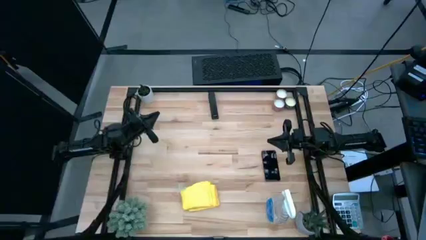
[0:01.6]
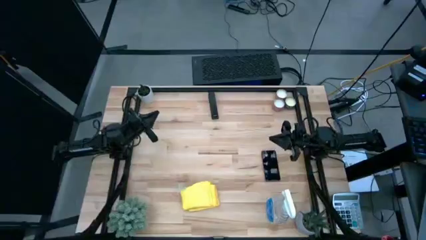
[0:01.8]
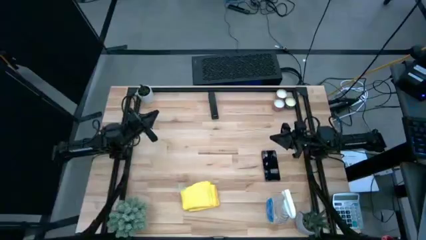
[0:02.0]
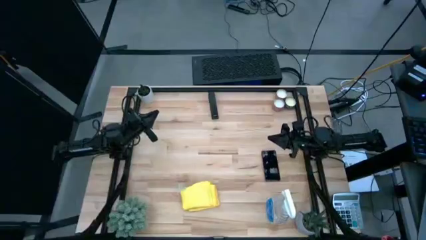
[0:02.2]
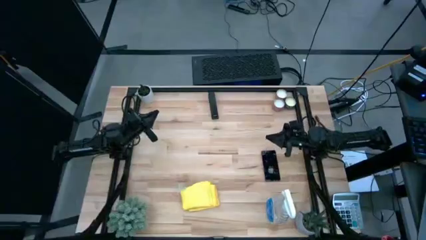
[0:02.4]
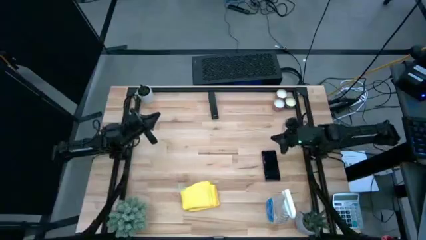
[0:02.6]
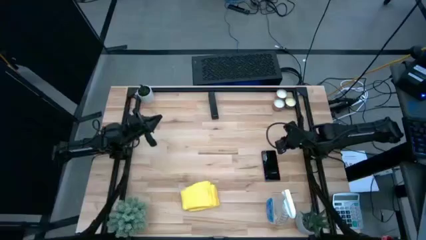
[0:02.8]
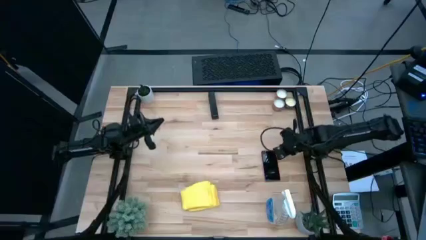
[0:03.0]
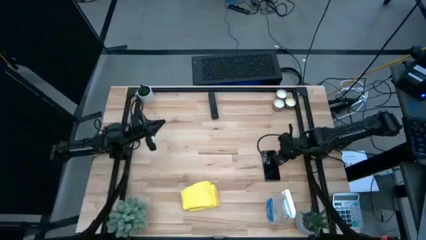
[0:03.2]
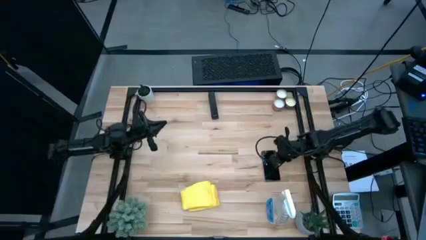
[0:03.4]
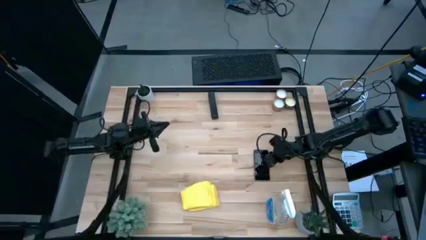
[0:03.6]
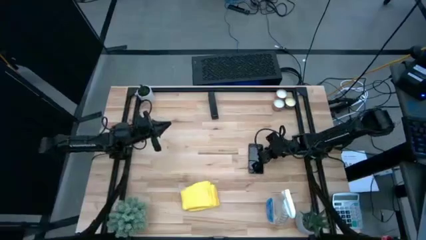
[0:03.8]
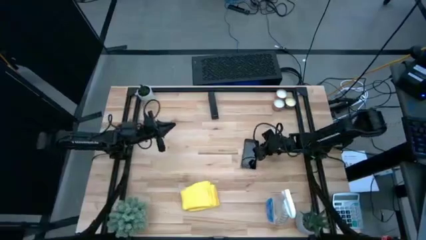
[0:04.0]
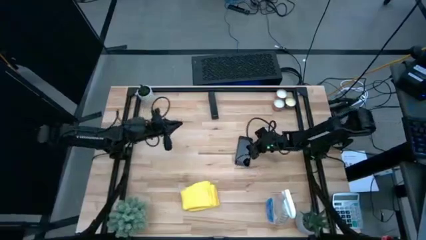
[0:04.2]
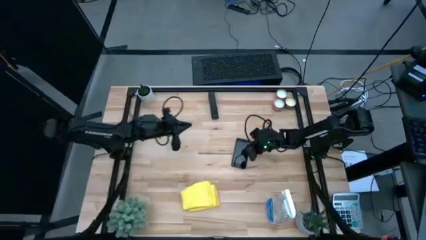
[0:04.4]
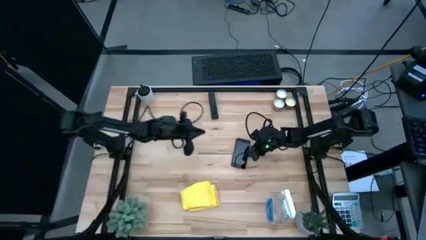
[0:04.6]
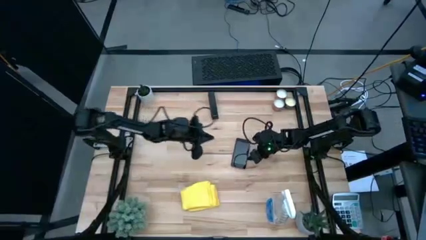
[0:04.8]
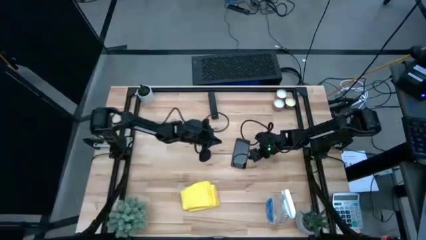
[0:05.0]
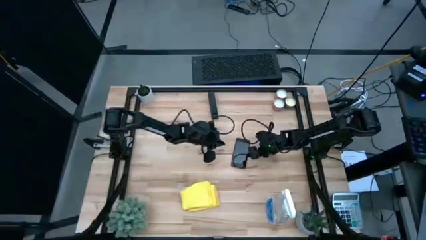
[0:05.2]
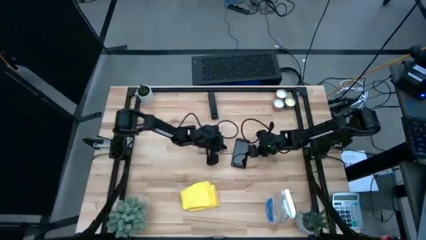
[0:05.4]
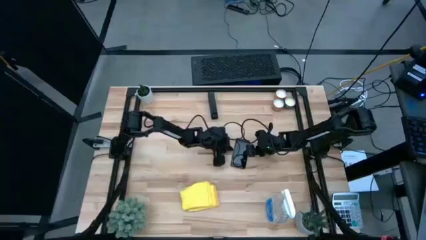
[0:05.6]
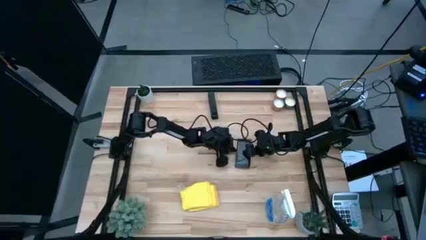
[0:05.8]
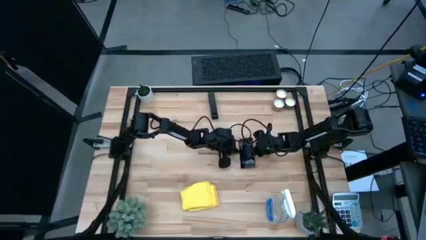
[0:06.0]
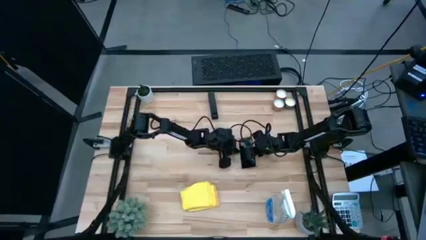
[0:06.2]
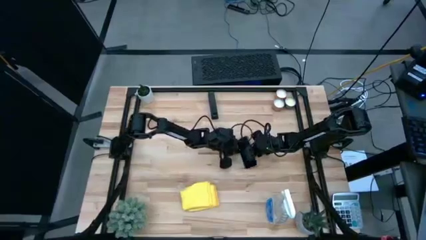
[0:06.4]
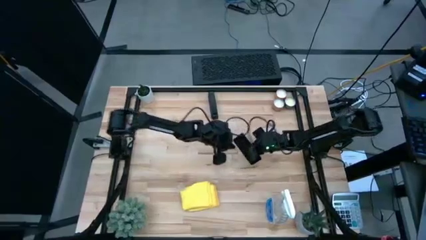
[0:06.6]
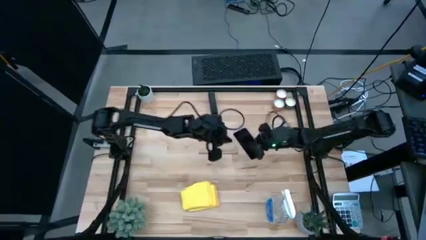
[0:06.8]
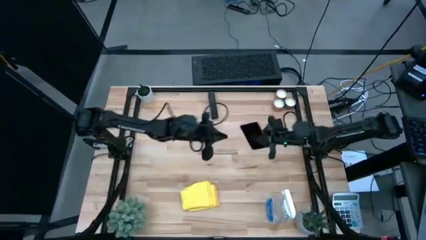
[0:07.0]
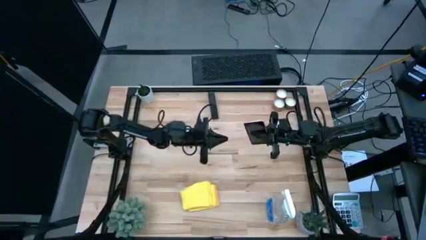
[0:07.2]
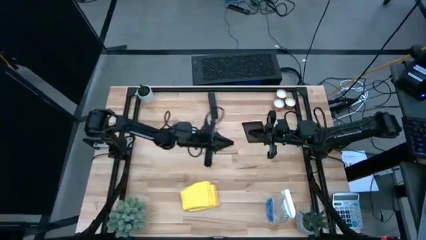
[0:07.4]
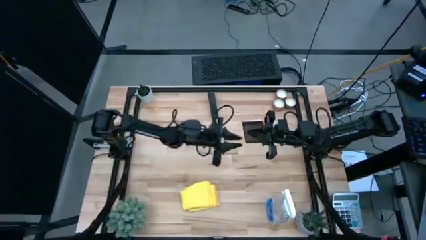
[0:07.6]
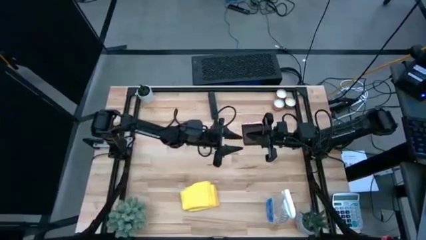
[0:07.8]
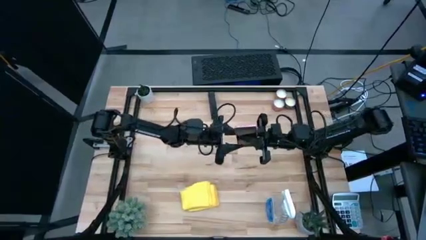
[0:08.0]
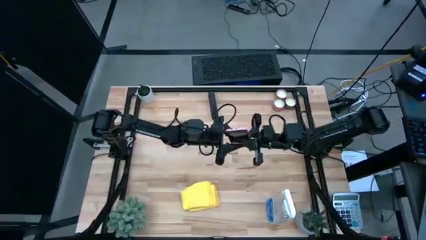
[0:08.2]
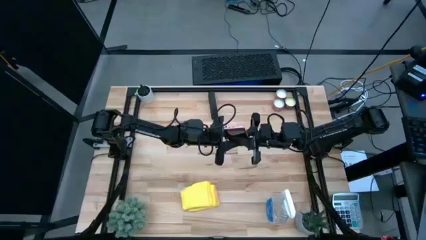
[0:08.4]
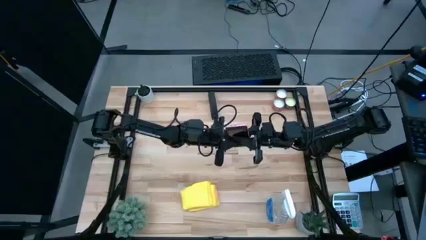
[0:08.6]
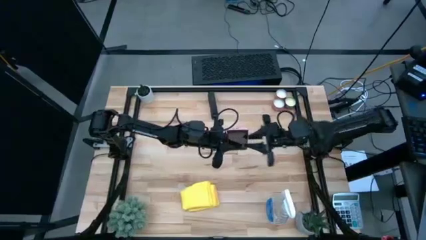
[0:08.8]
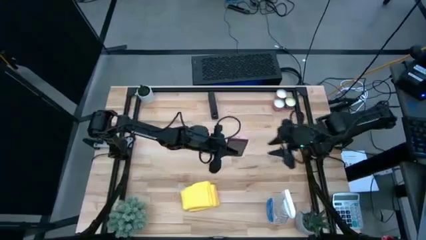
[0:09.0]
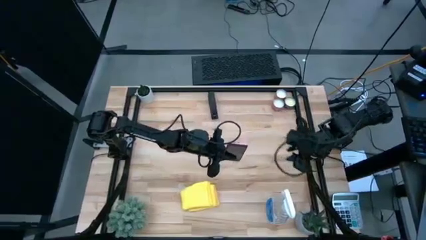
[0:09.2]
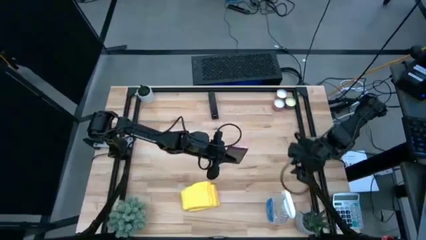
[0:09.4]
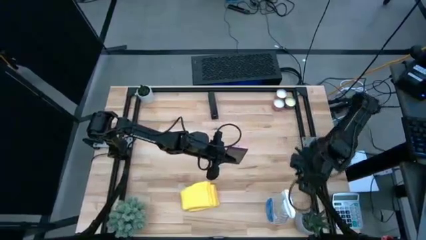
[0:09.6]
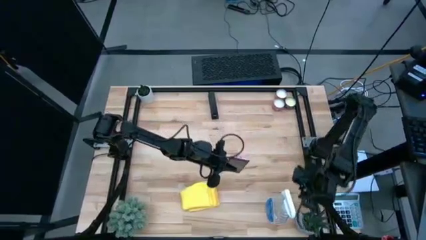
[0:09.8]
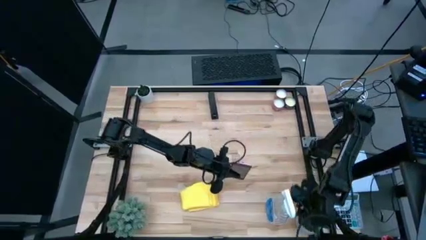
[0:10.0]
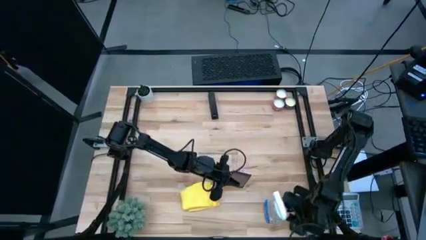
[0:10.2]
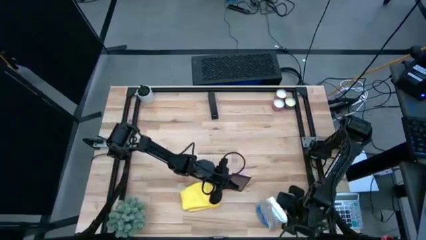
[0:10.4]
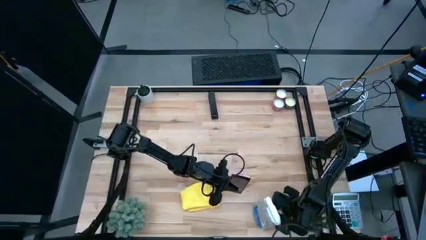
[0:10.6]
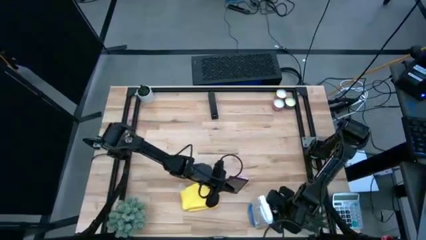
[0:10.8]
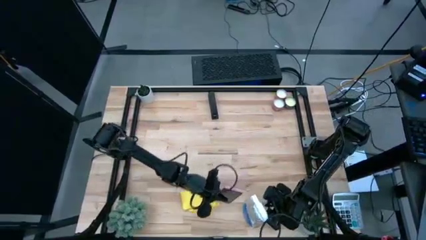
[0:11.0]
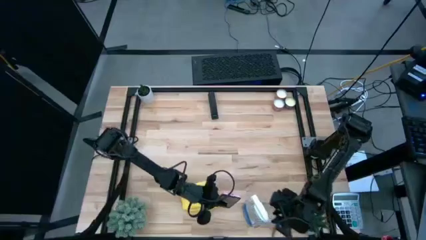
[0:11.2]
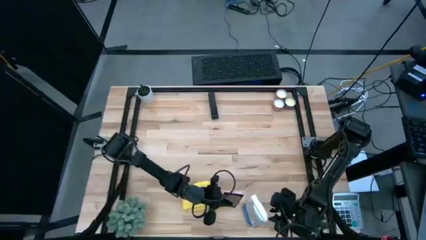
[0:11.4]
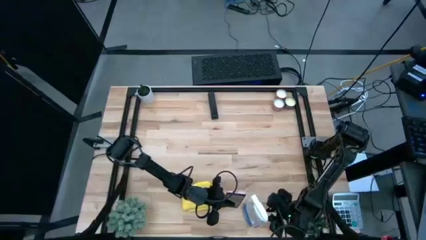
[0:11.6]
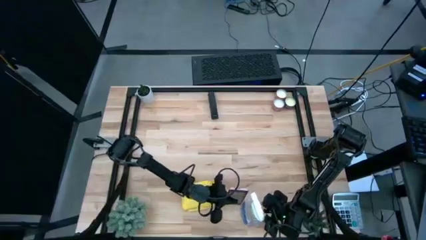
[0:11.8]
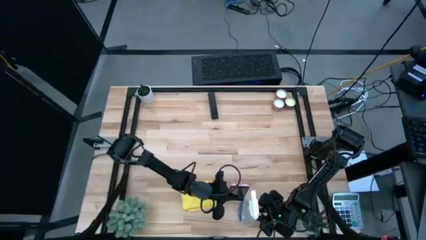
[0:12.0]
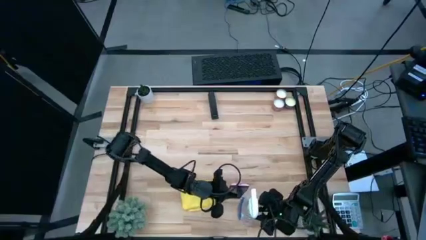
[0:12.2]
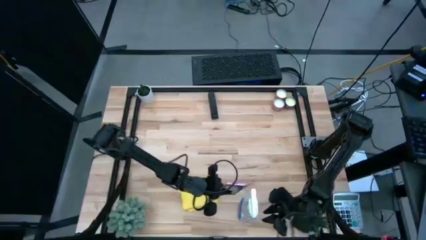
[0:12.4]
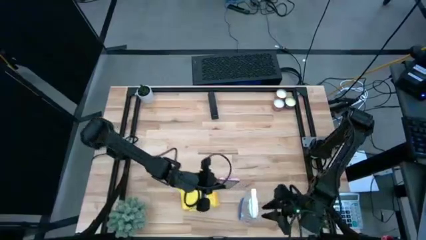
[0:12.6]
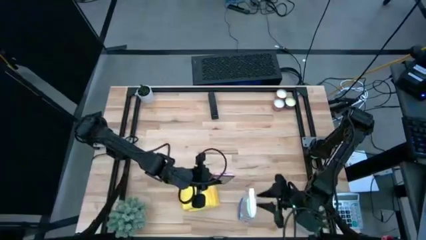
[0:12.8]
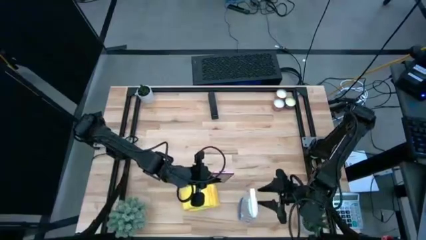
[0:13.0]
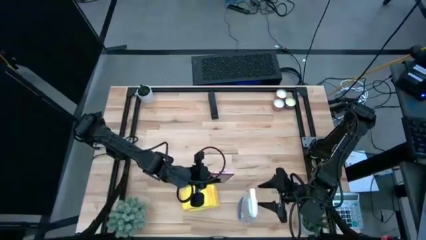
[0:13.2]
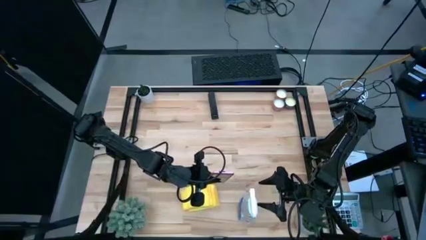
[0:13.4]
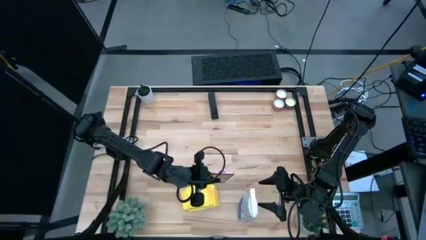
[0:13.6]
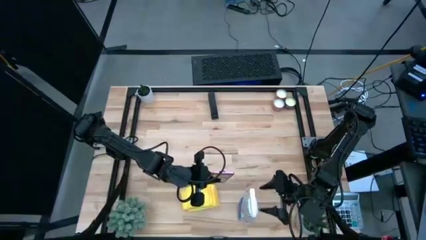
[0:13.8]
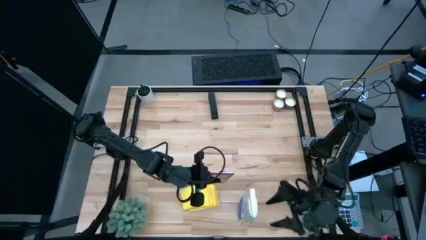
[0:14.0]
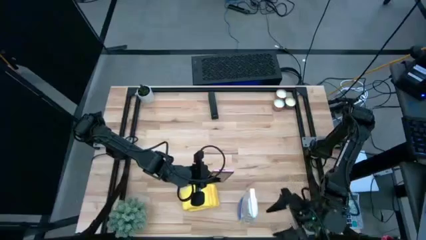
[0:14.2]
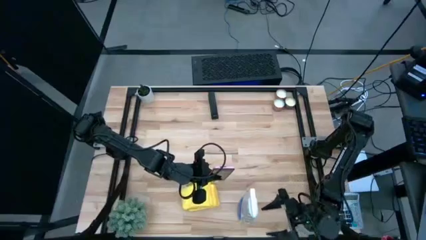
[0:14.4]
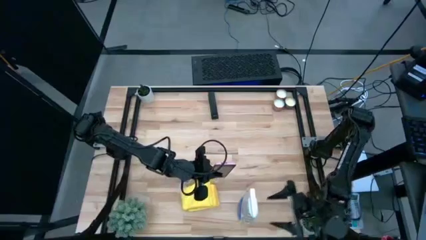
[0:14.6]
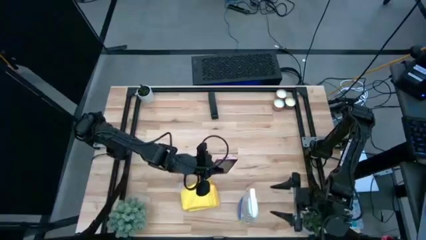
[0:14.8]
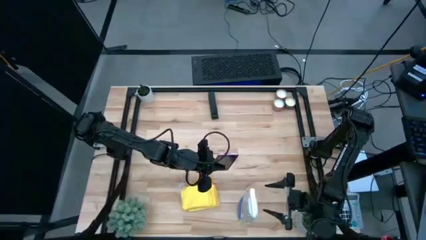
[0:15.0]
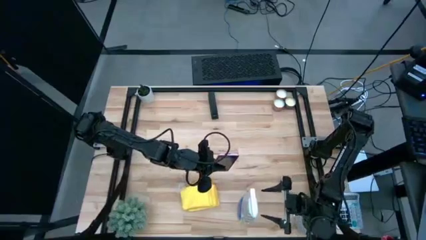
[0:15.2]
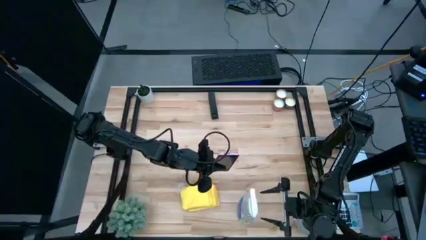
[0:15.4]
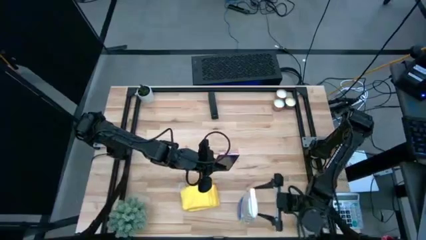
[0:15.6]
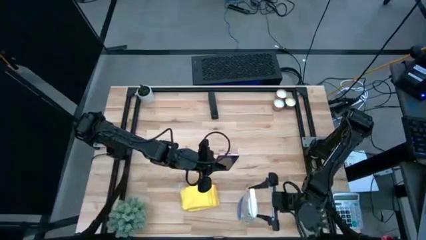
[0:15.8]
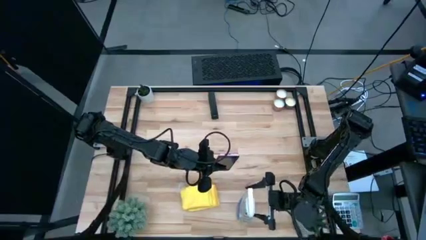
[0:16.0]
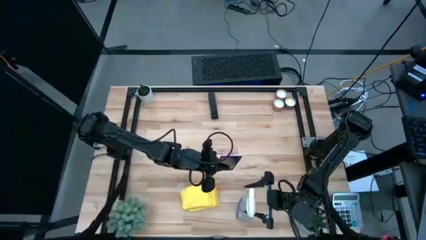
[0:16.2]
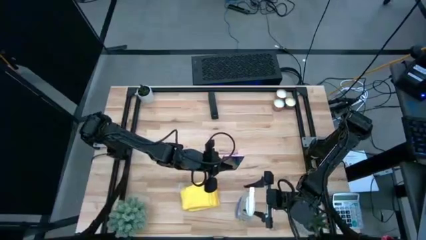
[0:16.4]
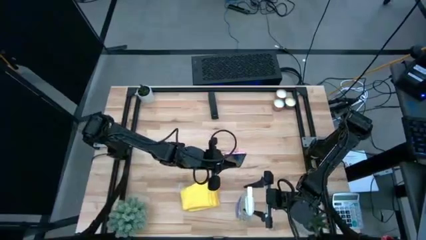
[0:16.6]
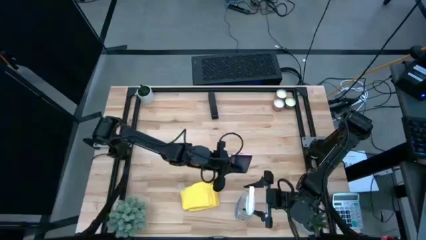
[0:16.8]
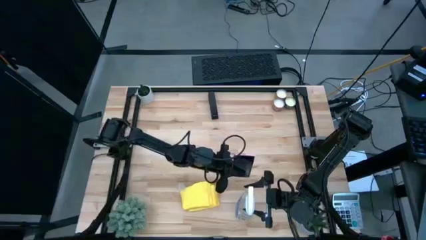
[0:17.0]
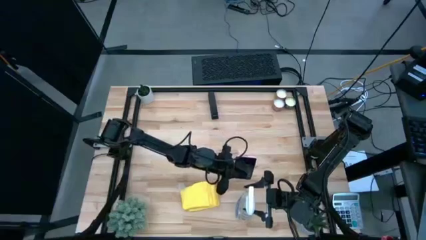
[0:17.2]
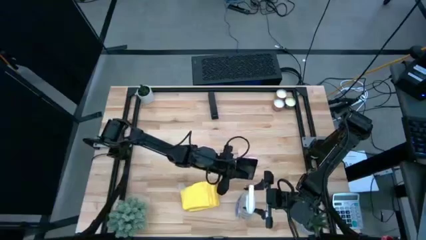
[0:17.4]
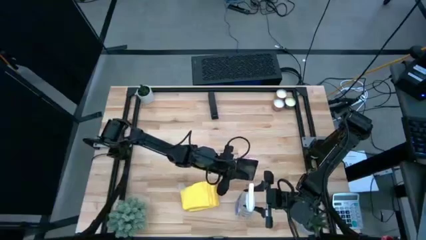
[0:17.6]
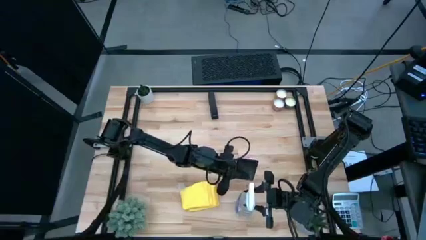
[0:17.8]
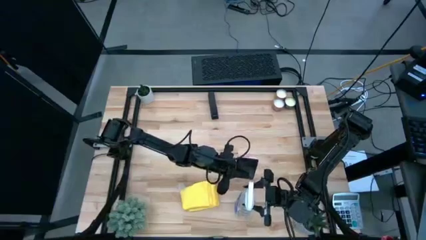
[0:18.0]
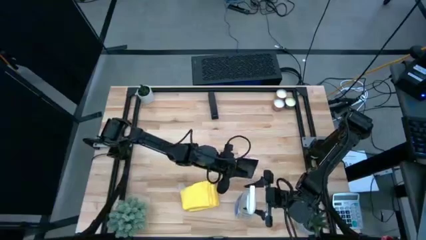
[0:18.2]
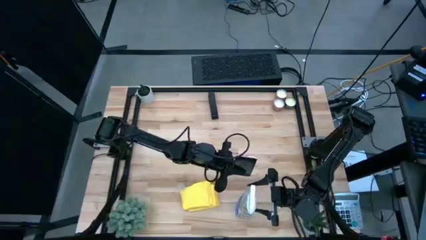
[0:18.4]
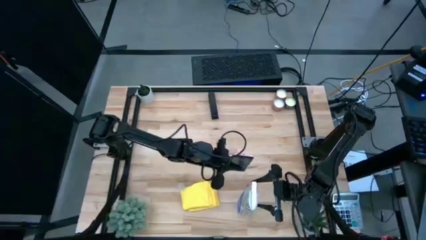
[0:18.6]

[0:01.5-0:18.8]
Task: Apply microfiber cloth
Spray the front of the pink cellphone using the white spray bottle
